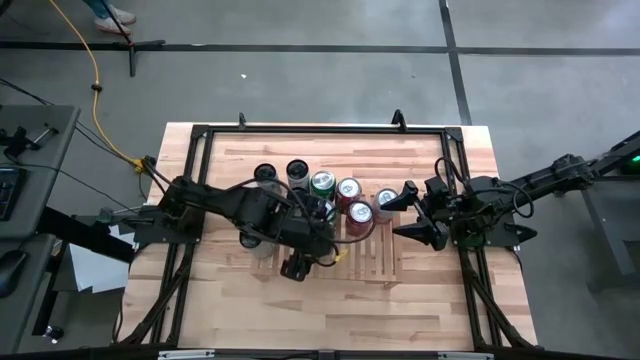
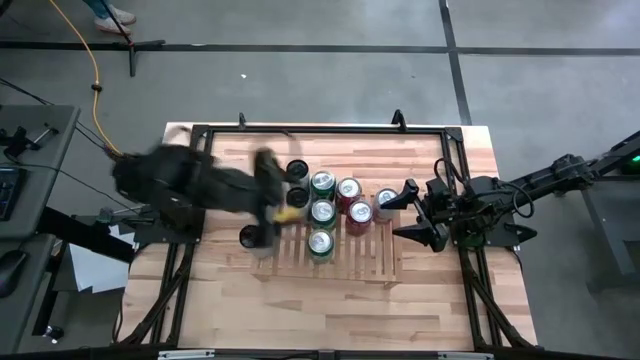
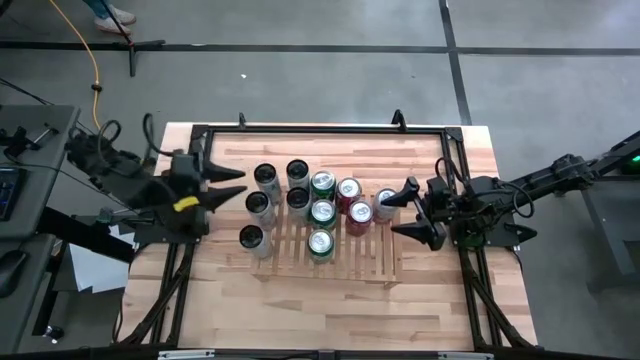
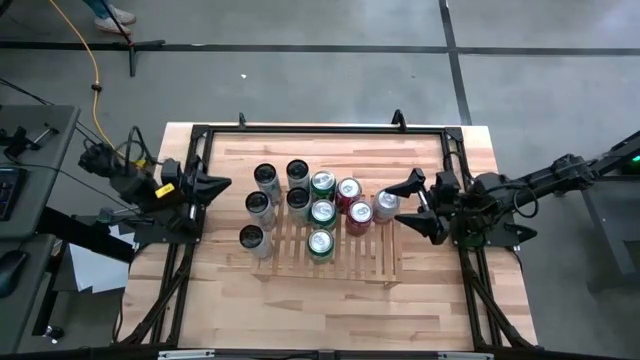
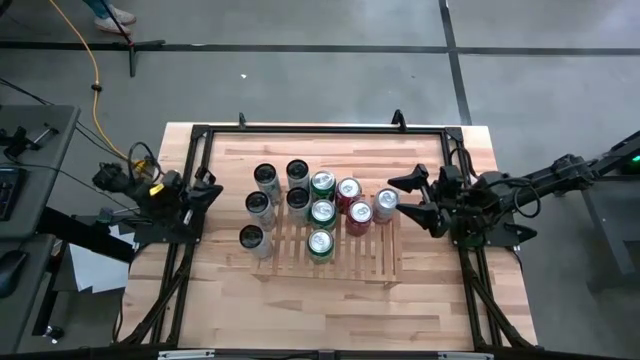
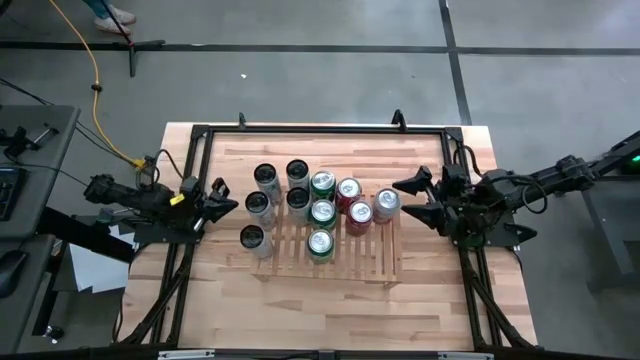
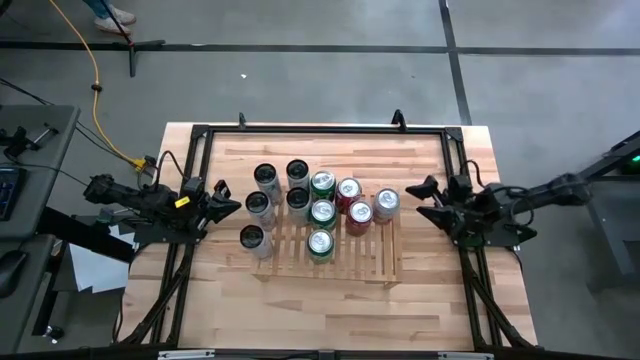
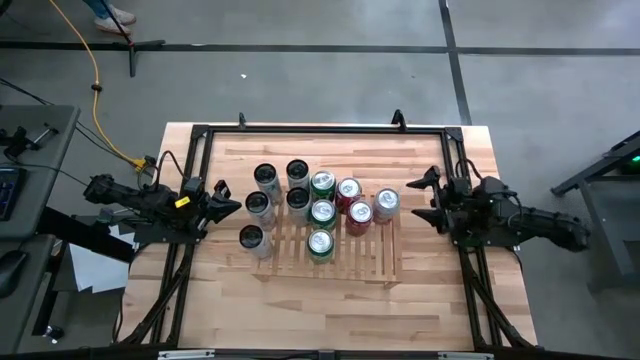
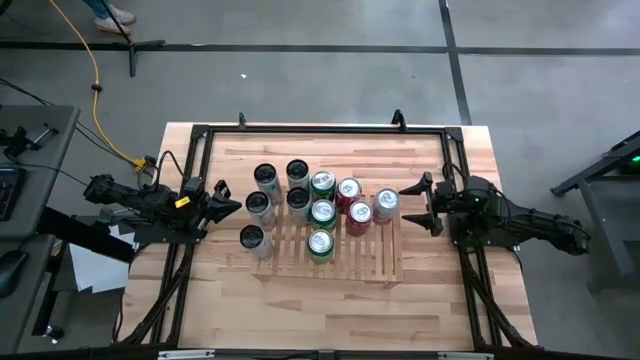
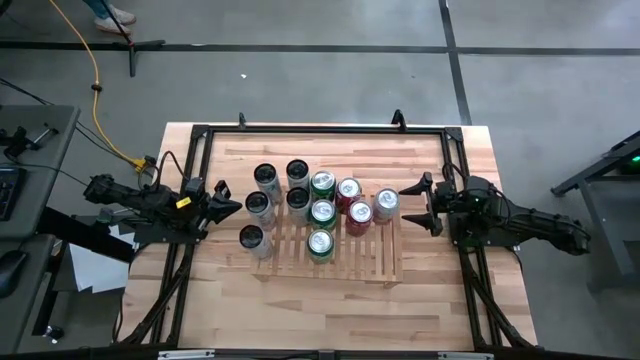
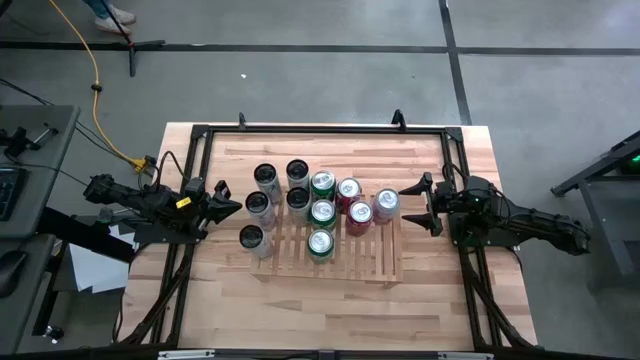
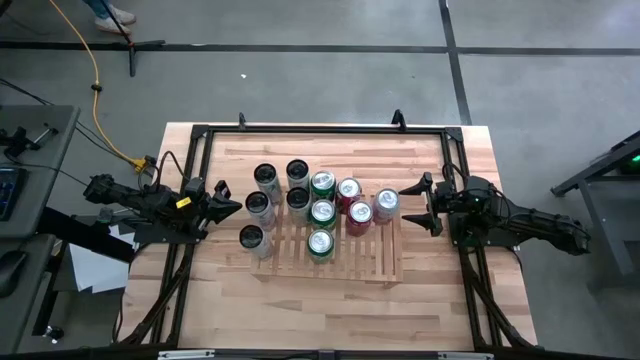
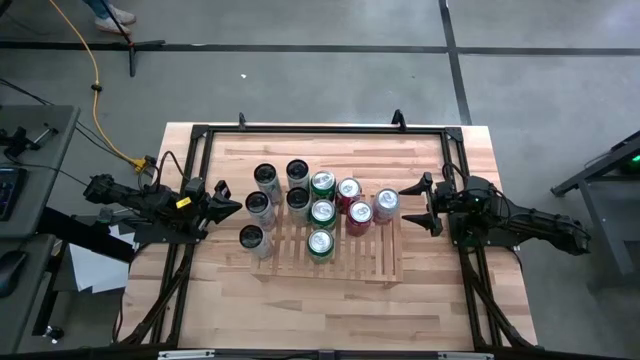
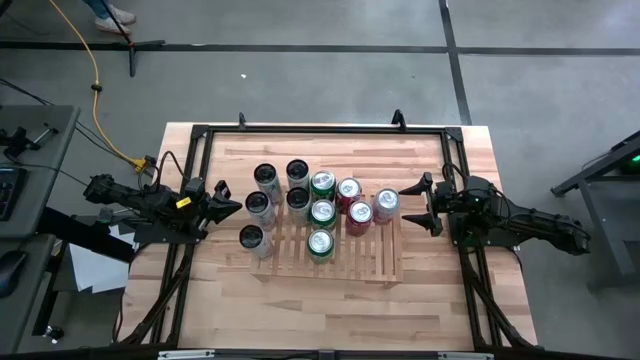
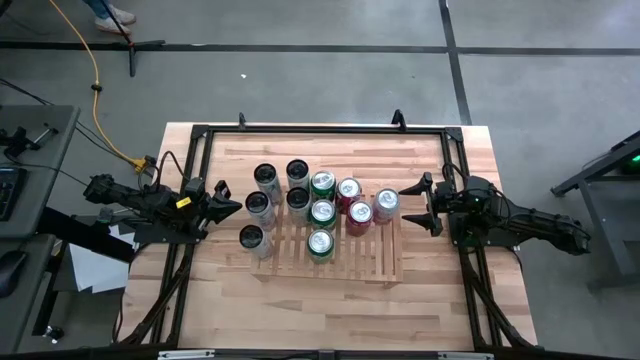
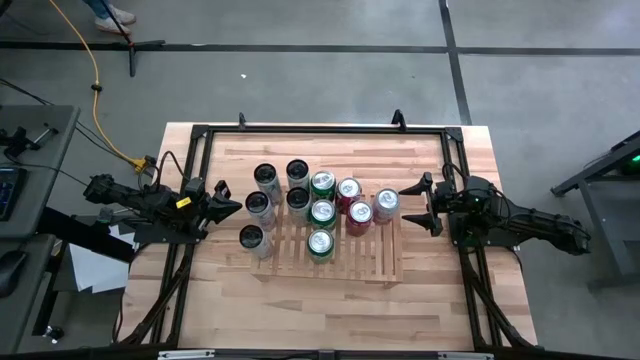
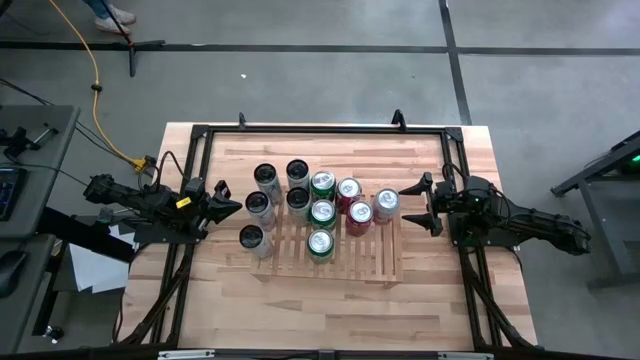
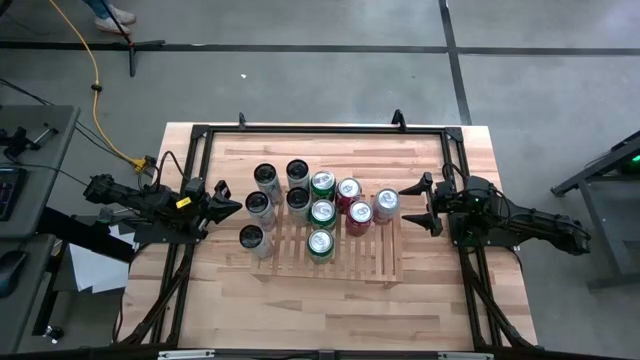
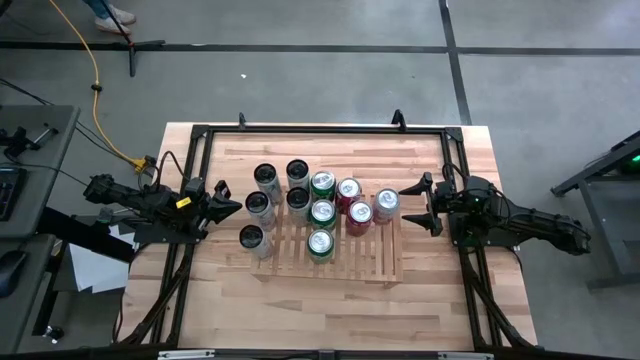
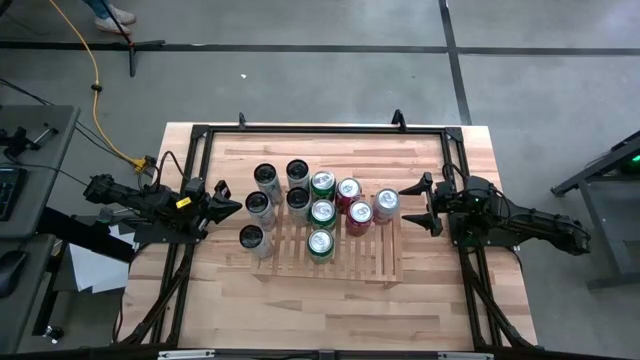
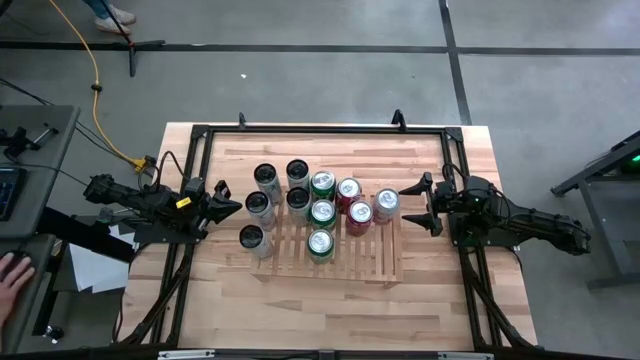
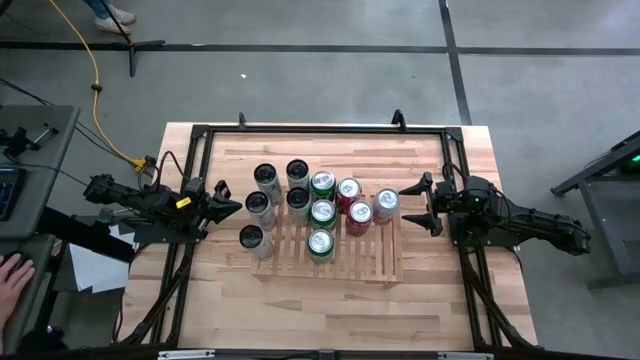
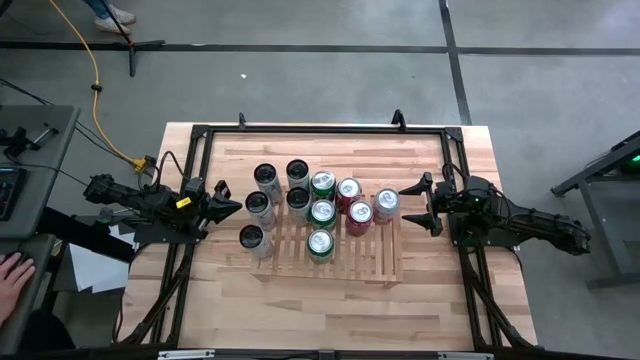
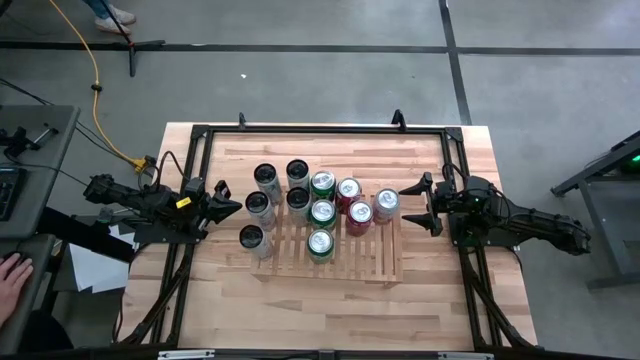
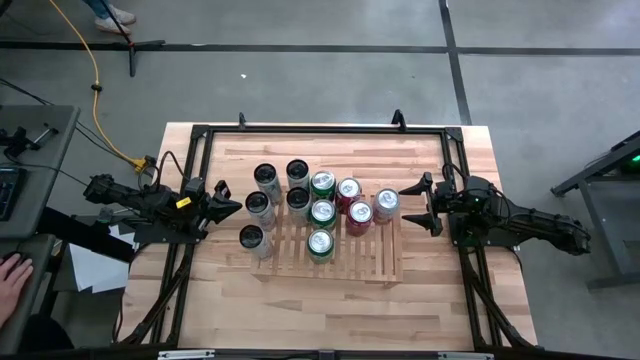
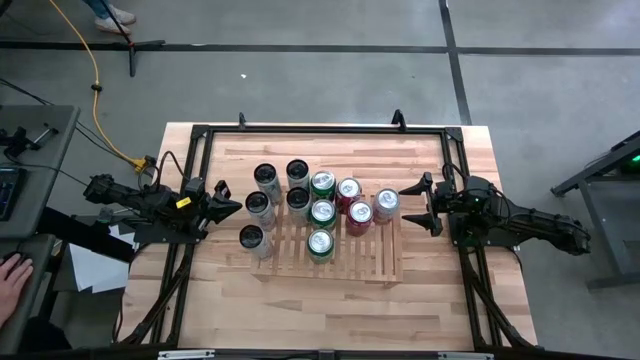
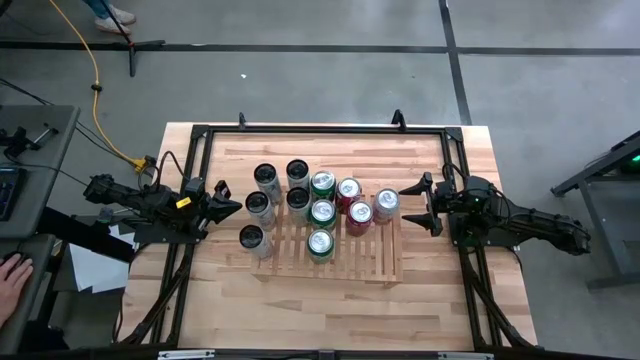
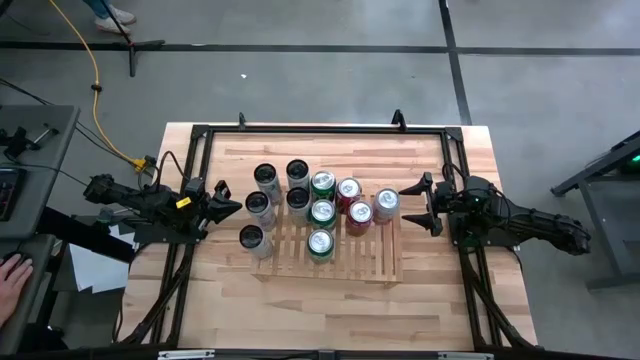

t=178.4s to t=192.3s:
Task: Place canned beverage on shelf
Return to Home Position

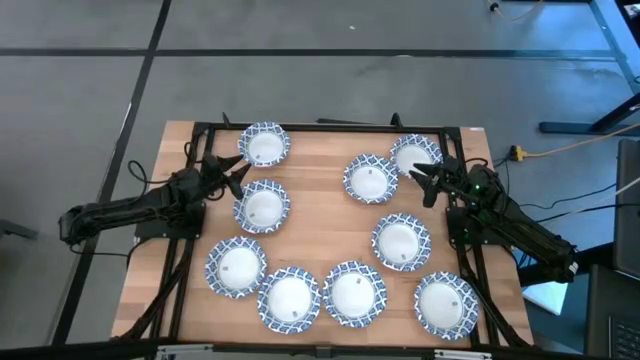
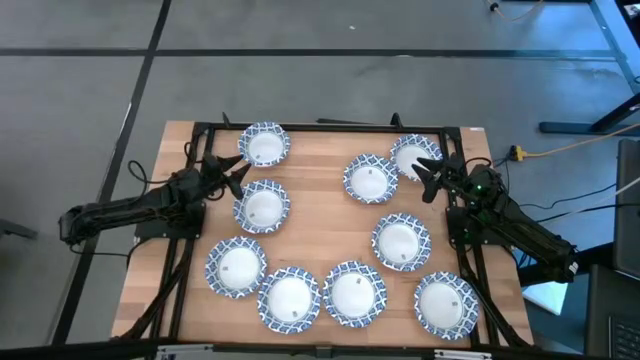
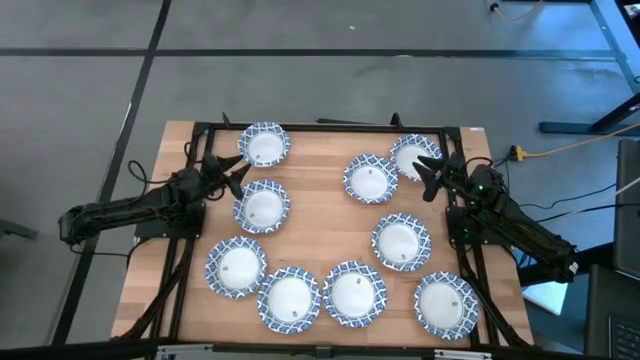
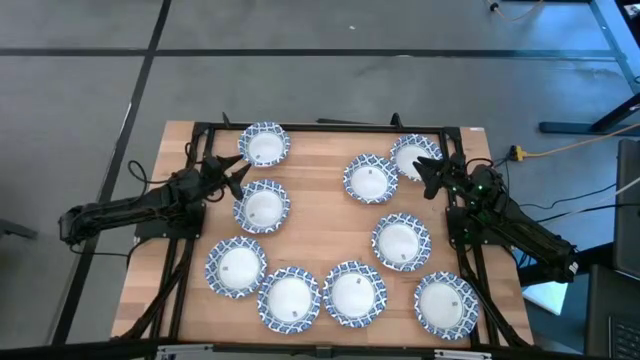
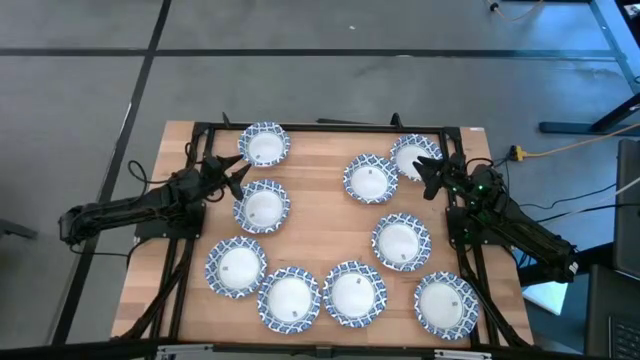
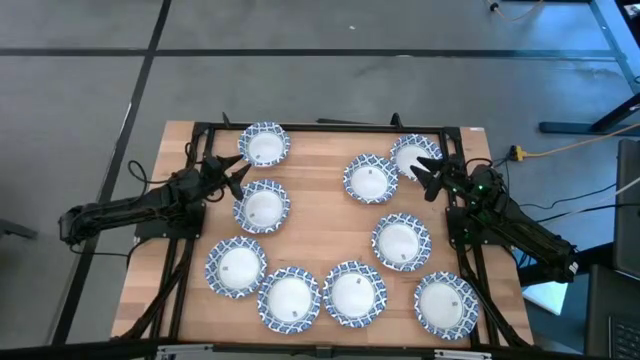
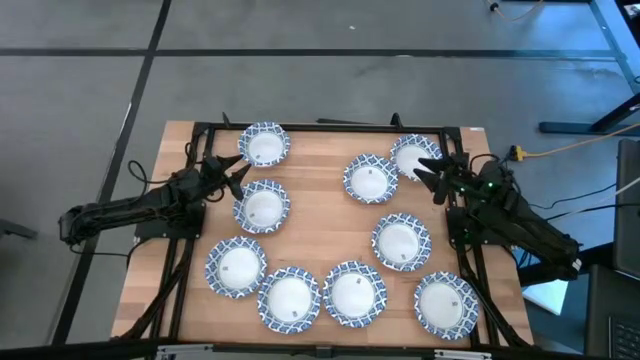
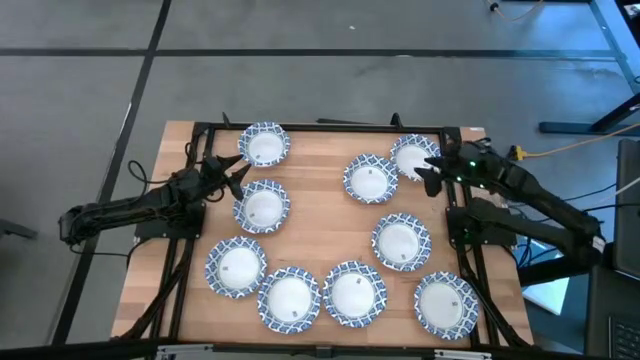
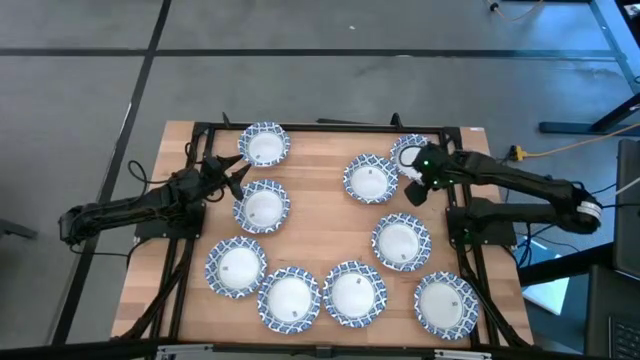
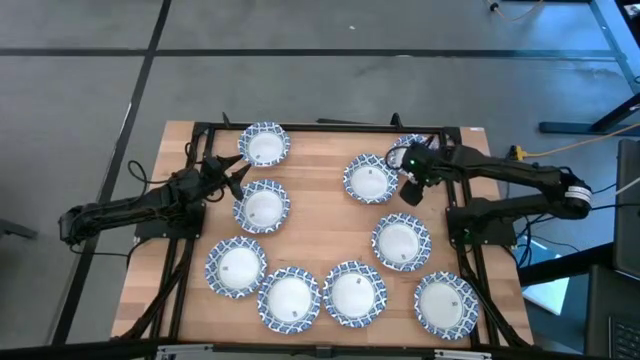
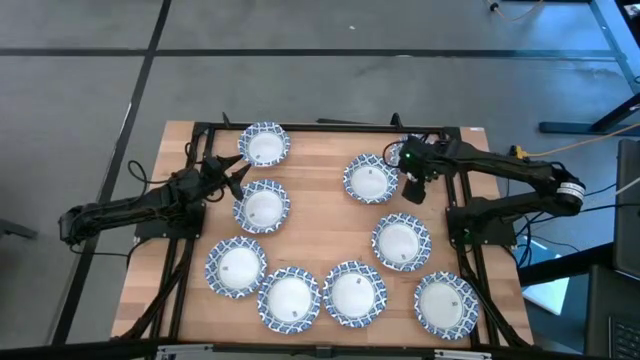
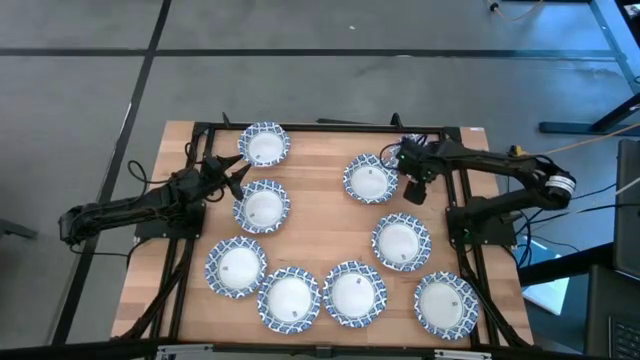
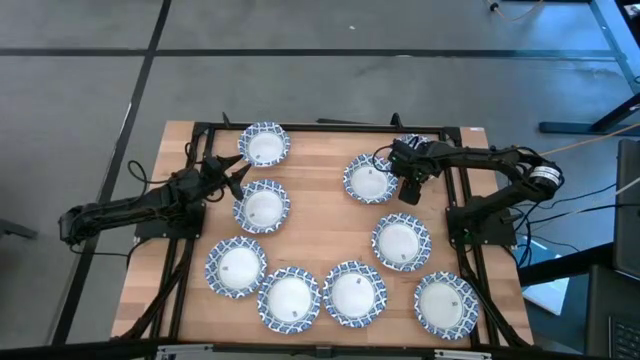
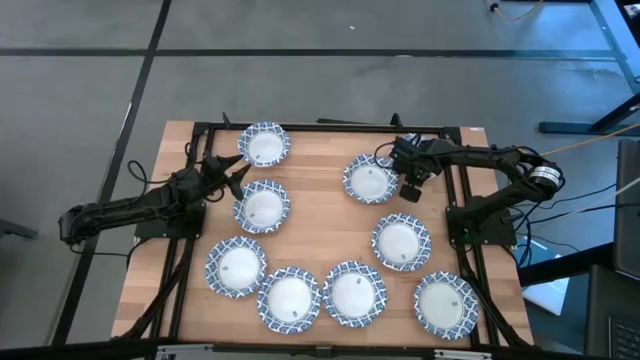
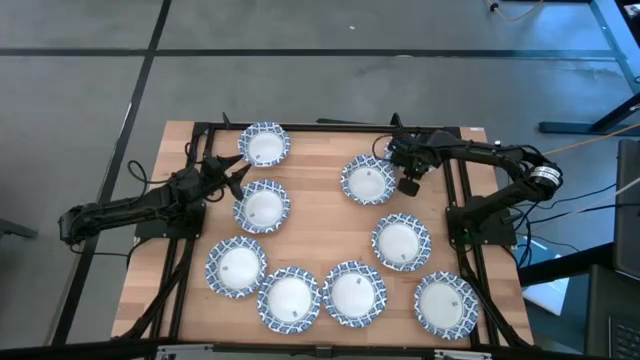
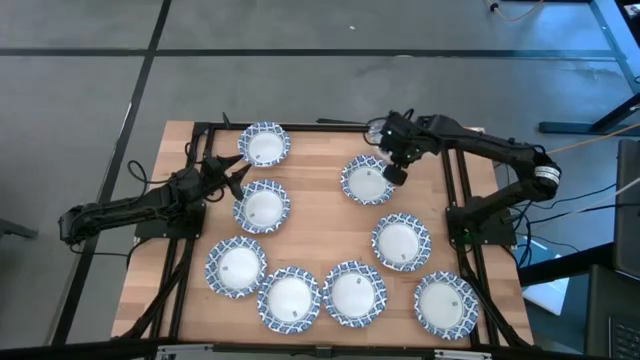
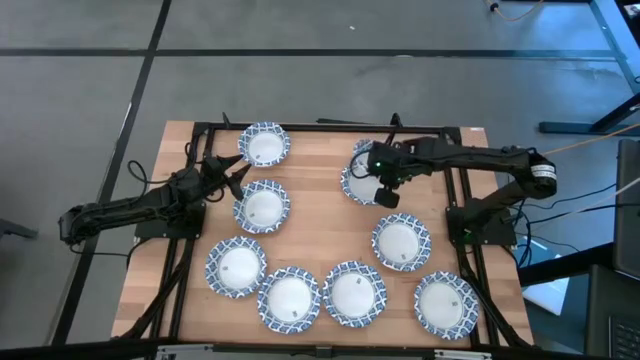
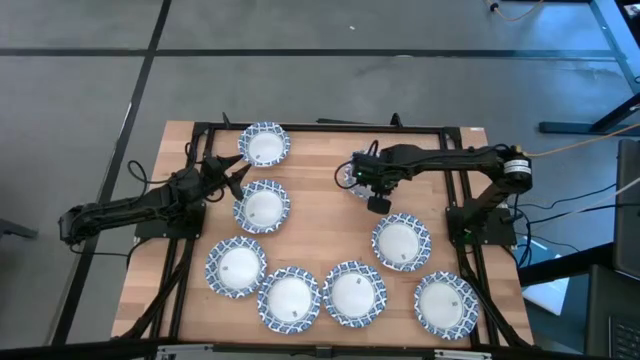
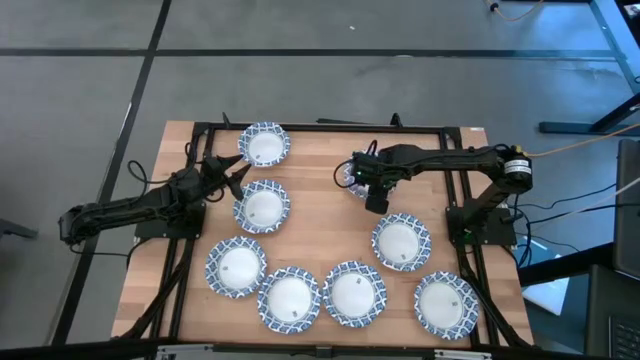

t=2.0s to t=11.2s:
Task: Nest bowls inside each other
Stack the white bowl on the white bowl
